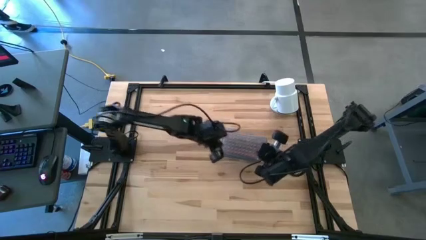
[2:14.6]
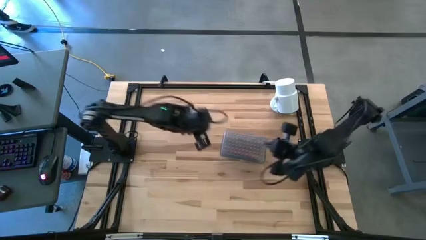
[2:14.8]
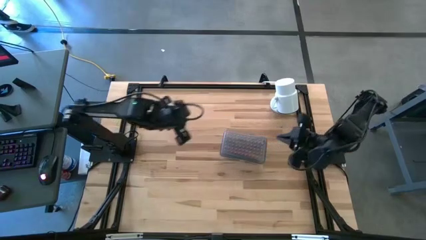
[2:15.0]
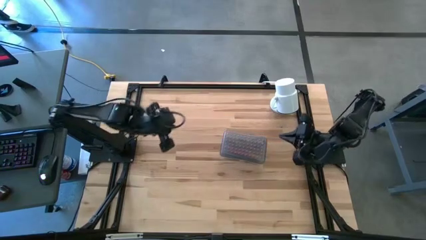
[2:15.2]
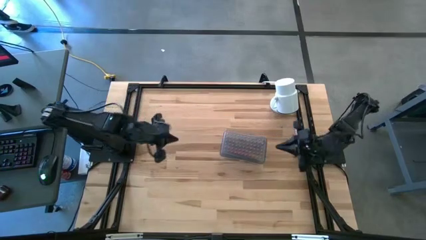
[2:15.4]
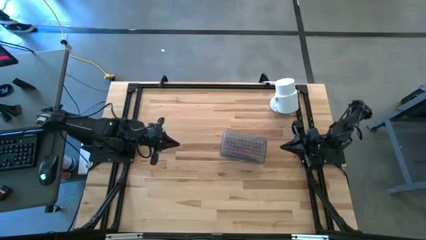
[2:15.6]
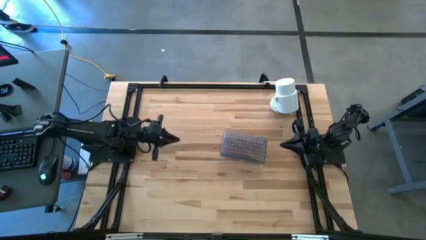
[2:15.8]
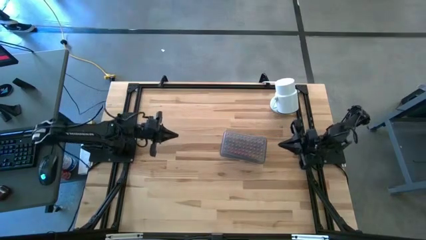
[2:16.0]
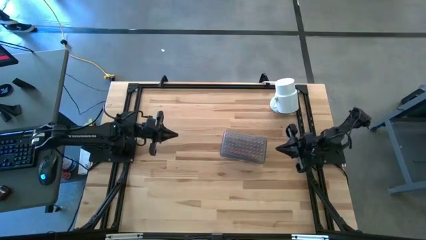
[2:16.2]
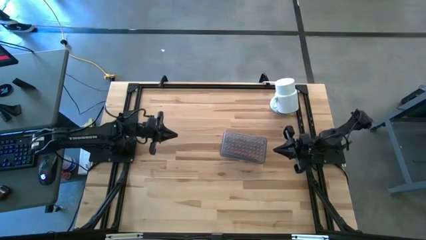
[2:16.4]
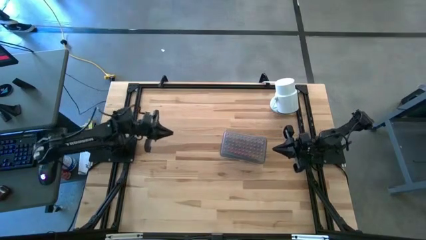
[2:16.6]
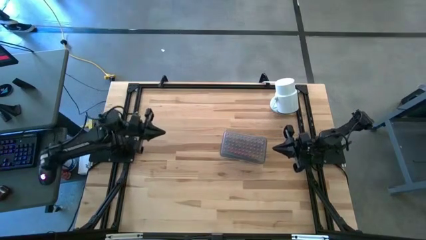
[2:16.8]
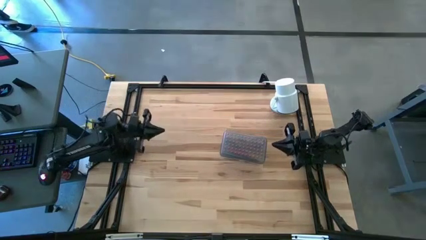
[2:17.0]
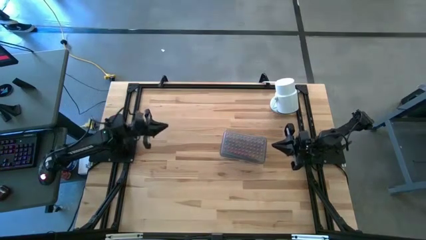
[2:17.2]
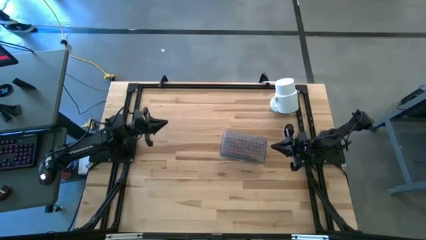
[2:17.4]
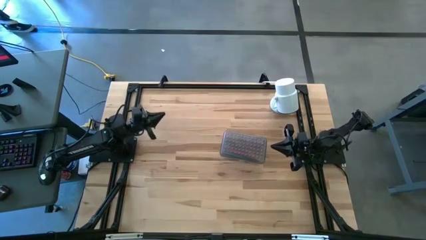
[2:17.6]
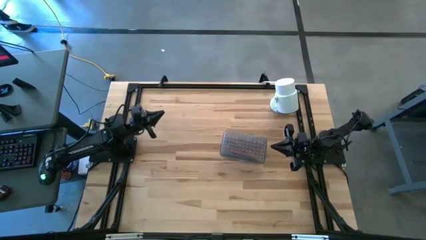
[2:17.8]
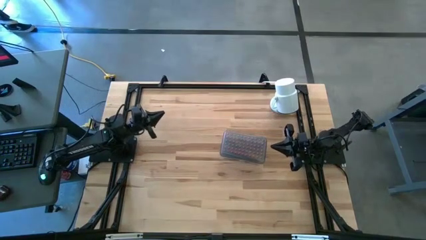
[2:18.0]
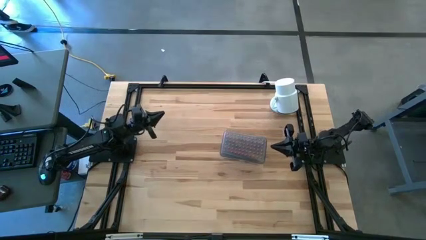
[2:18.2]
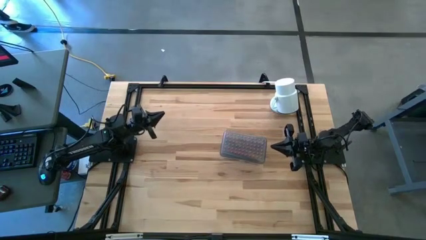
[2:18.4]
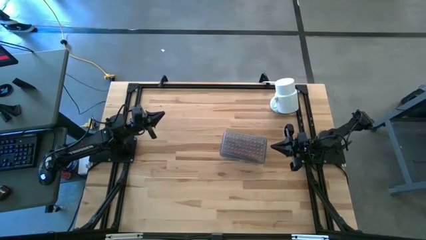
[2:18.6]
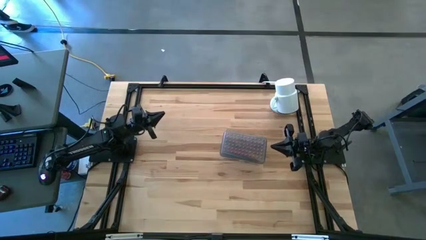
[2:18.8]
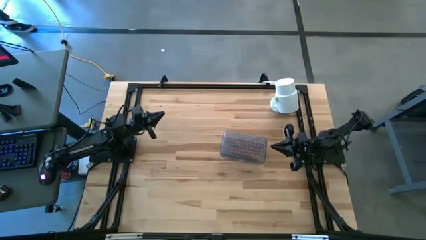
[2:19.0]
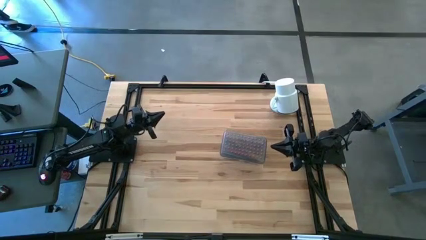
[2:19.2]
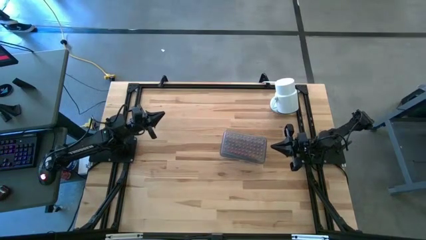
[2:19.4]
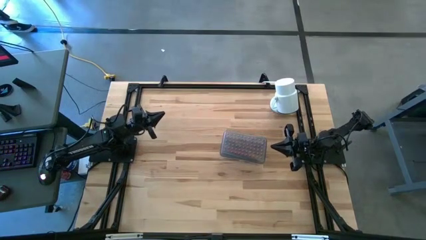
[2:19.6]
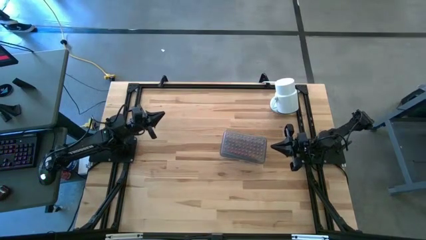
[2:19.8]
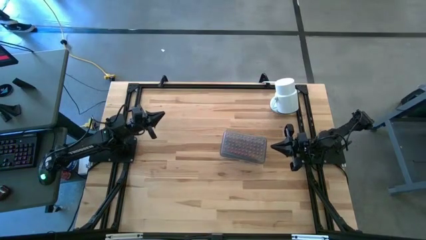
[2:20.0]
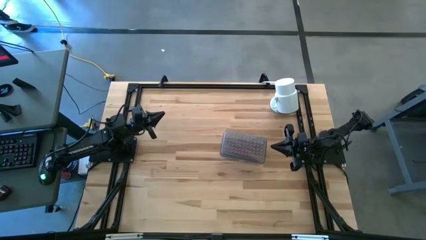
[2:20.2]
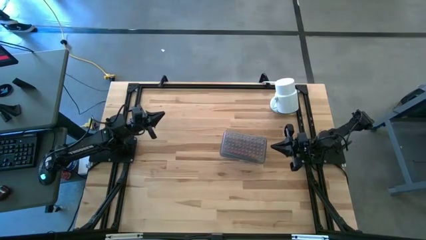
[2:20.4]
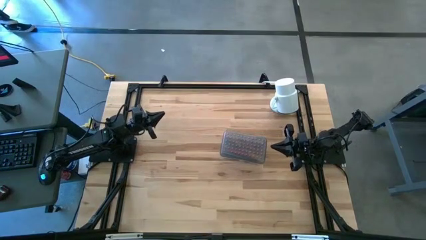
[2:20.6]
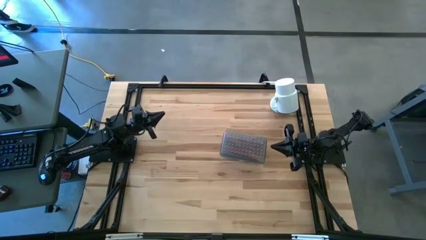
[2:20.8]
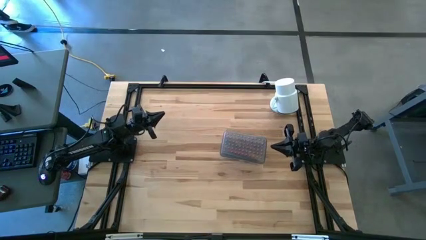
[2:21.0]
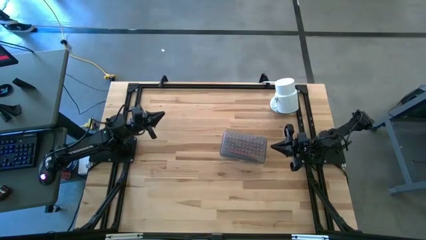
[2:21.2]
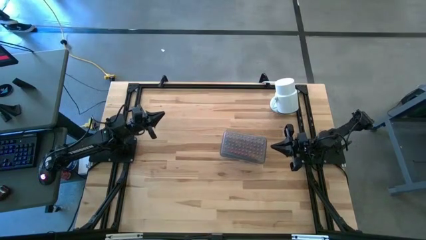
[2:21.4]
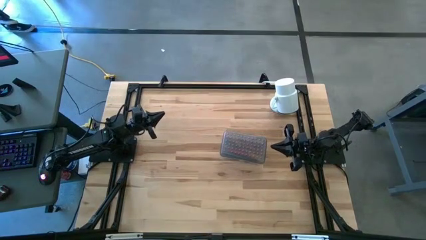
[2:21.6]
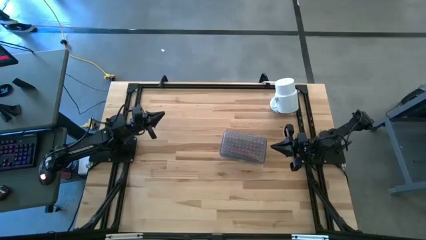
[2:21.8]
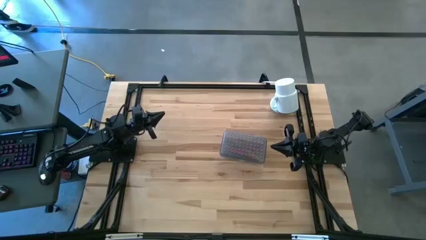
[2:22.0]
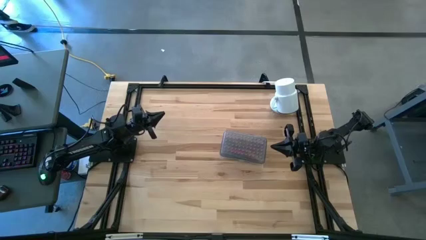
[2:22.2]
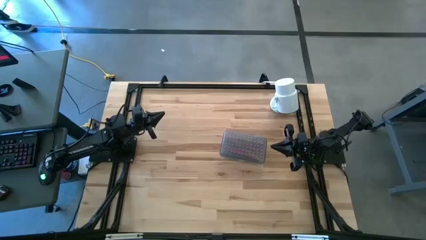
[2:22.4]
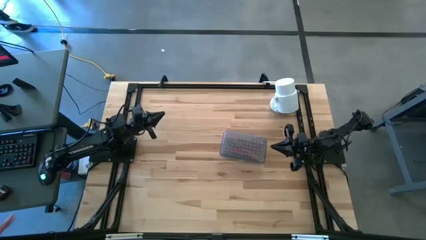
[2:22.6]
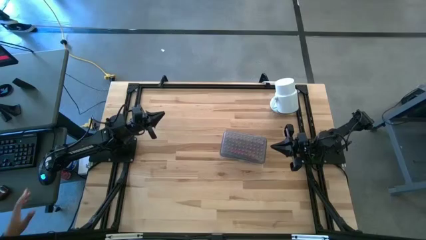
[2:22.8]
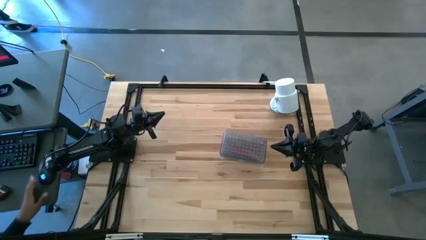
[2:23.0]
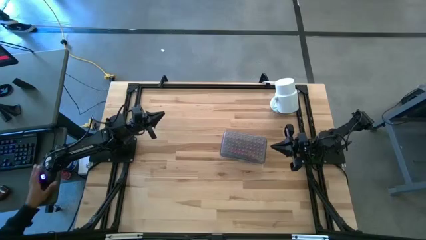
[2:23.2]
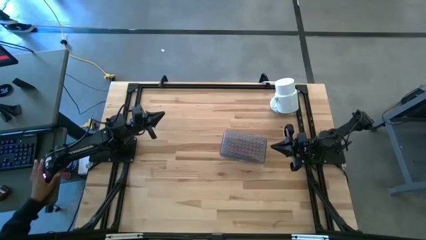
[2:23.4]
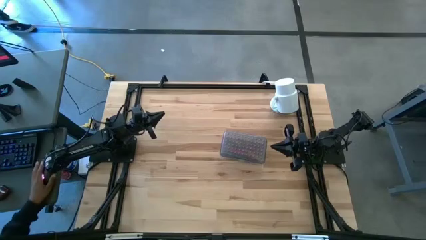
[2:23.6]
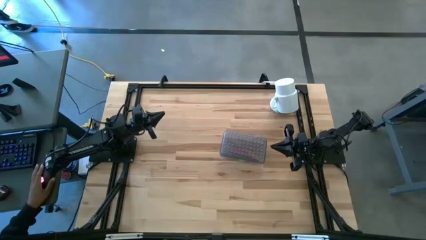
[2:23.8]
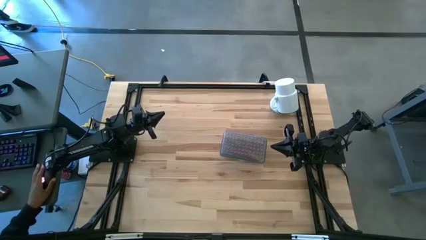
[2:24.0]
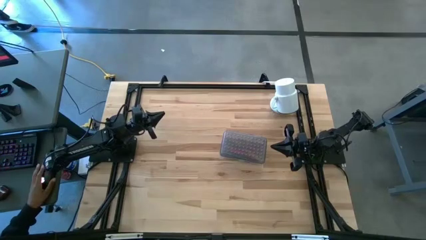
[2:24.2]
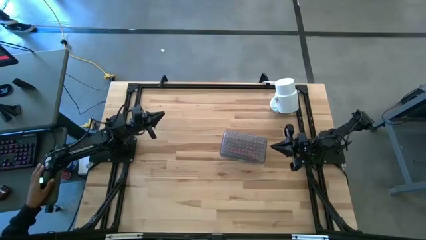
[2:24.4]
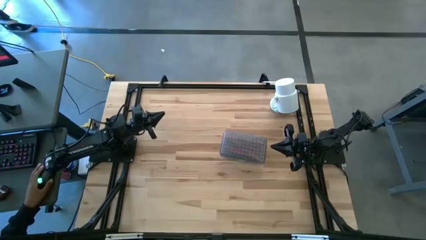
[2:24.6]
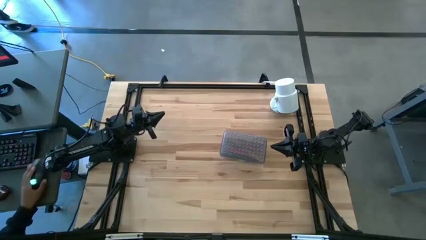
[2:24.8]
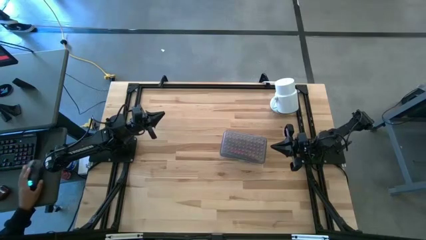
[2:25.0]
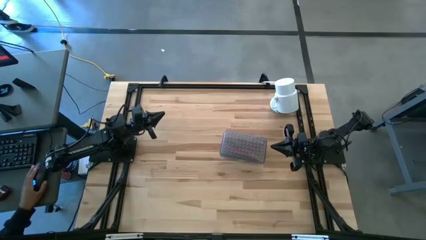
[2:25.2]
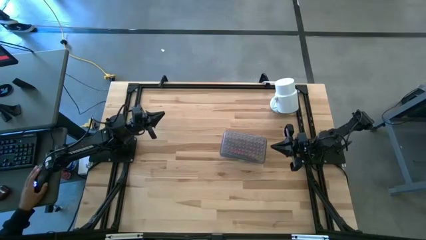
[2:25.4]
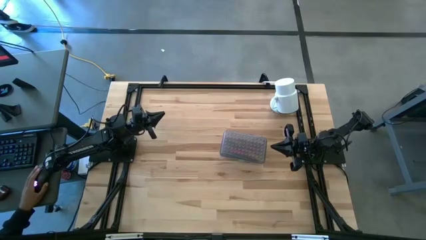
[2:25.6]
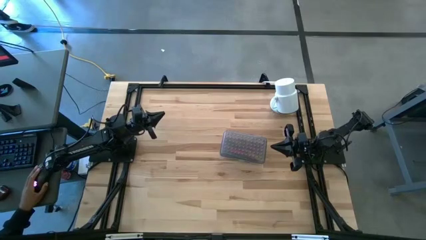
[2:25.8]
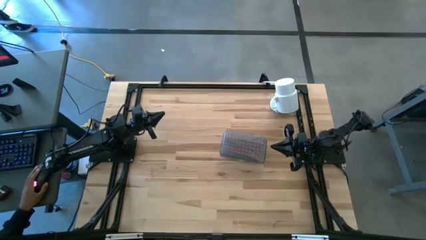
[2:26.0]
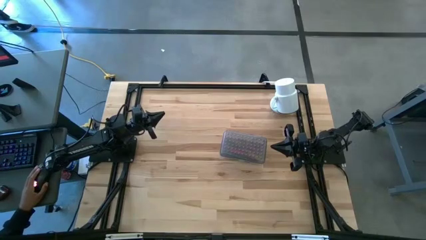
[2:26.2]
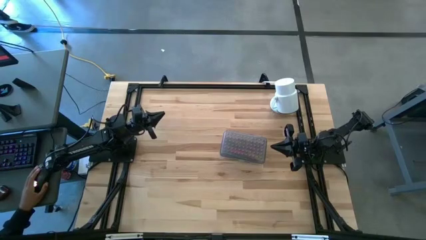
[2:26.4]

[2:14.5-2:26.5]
Task: Pick & place school supplies into a supply box
Return to Home Position

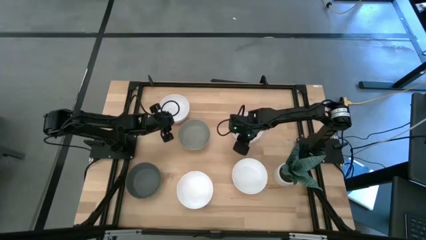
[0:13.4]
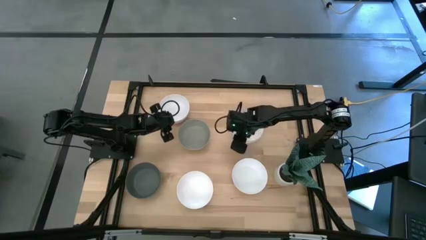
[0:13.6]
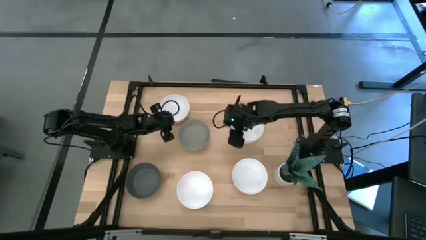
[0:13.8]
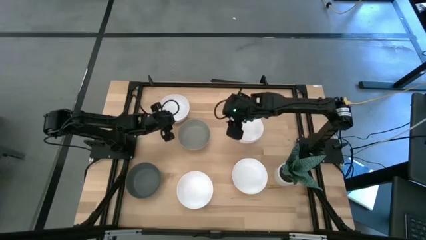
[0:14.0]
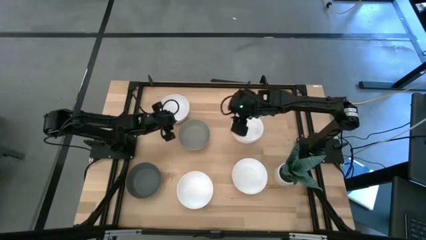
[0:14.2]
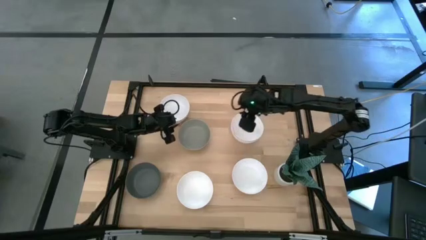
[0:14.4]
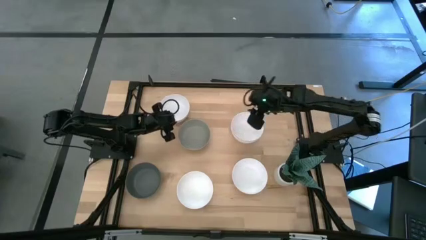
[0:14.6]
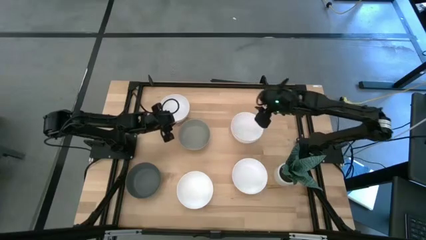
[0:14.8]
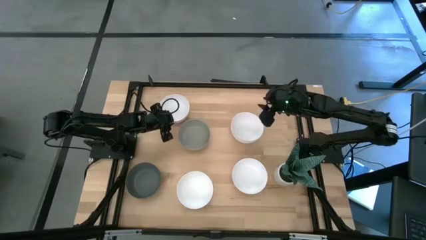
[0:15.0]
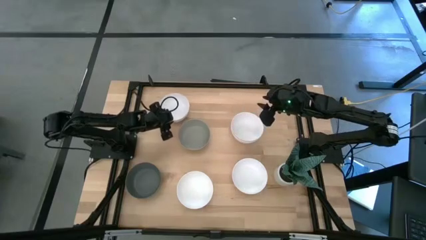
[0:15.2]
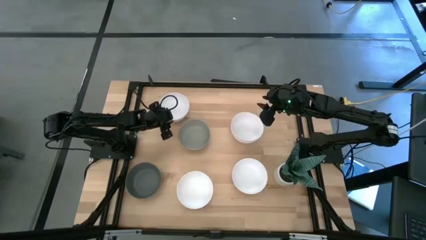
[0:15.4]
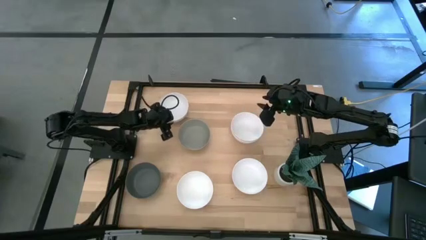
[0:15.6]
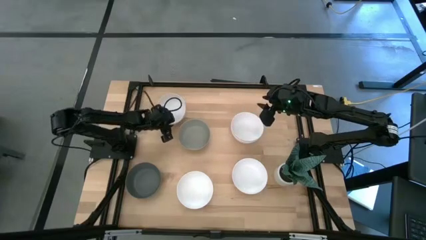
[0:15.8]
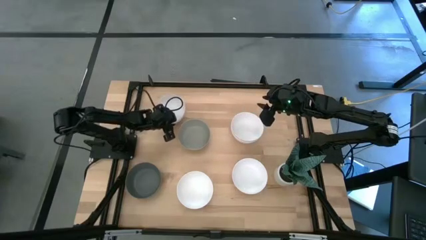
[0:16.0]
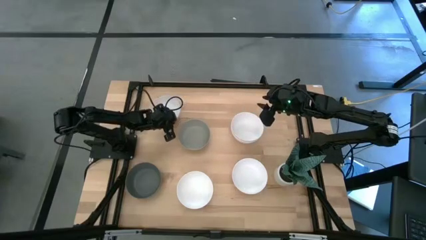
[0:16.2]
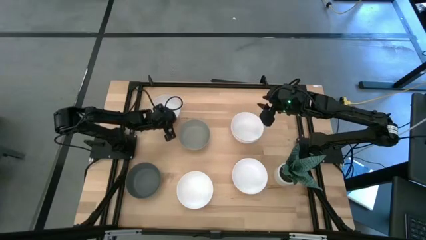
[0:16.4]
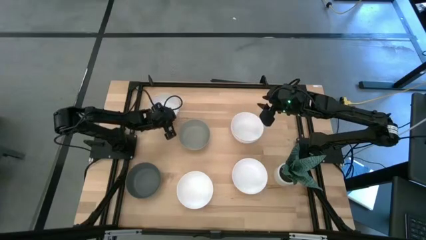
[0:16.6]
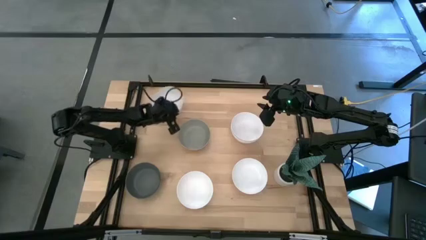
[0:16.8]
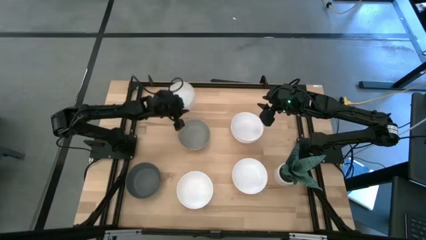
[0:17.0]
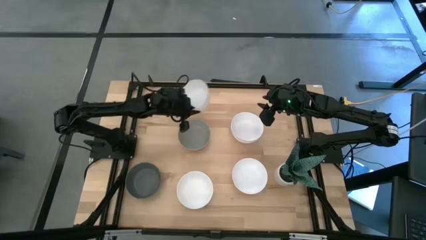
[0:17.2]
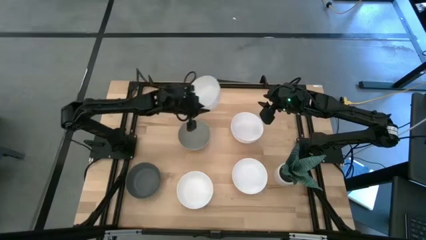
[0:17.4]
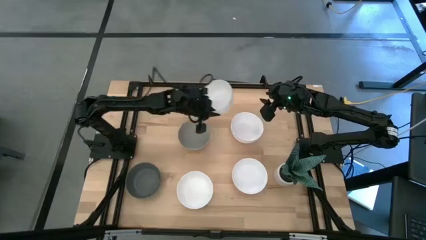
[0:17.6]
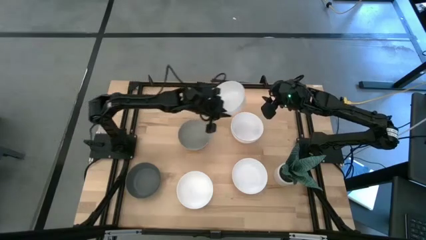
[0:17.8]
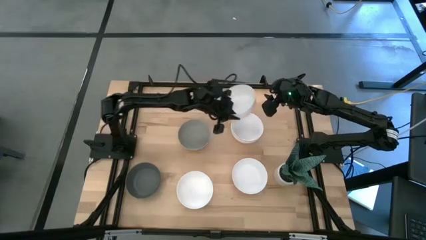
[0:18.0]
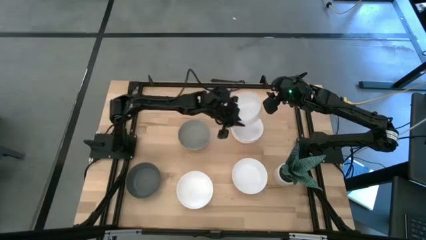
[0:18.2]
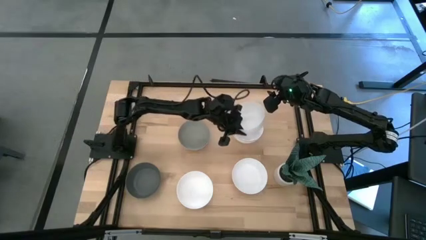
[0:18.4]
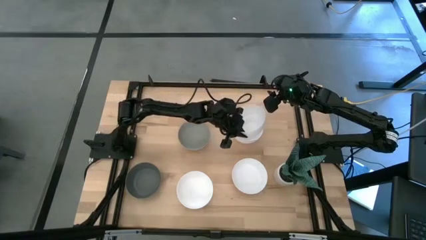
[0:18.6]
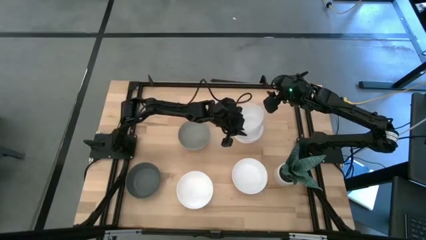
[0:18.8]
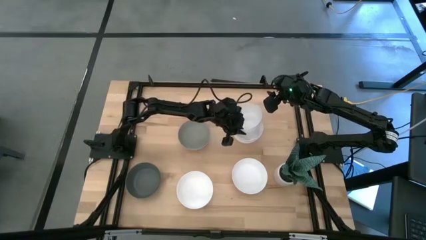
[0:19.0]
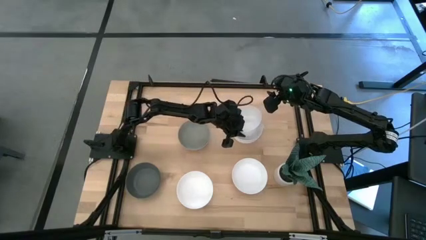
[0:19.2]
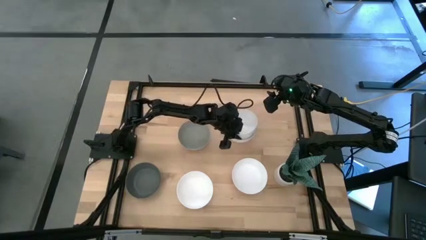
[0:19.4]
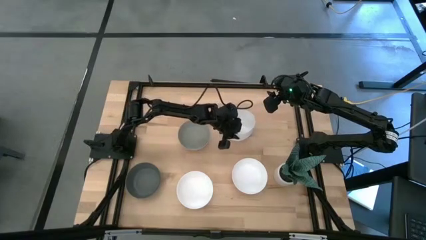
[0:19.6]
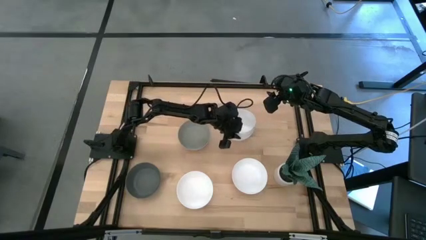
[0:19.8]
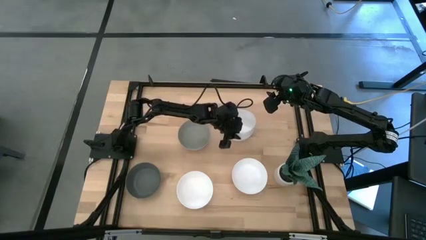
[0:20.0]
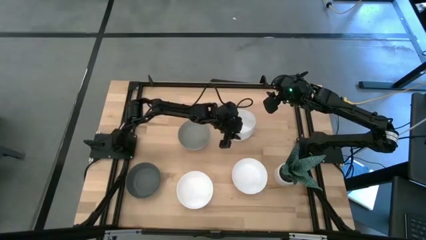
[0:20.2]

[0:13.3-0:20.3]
Task: Nest bowls inside each other
Stack the white bowl on top of the white bowl
